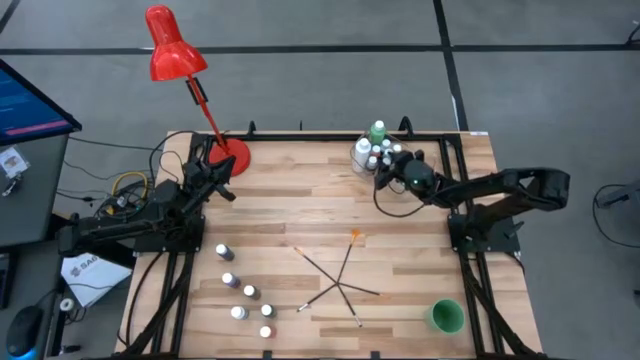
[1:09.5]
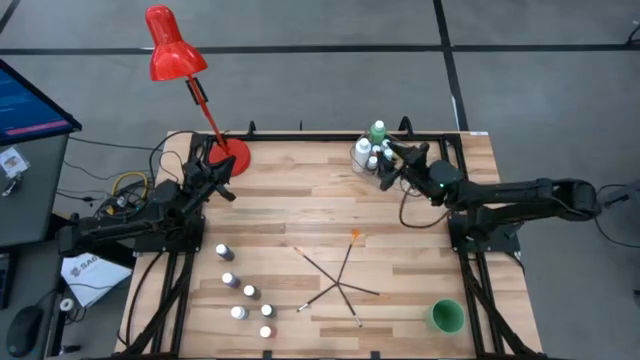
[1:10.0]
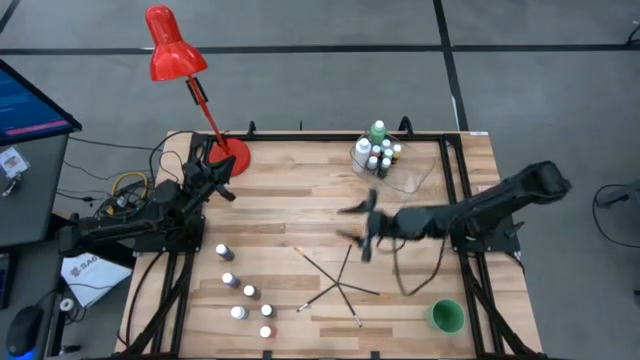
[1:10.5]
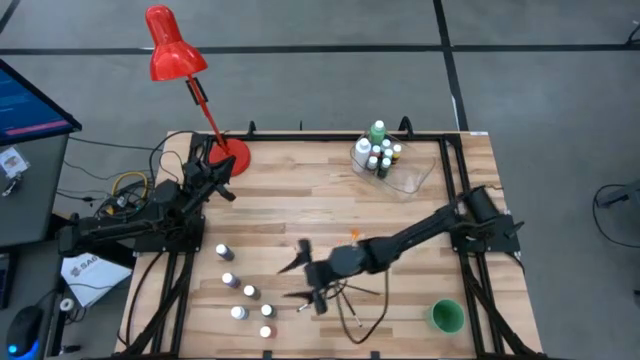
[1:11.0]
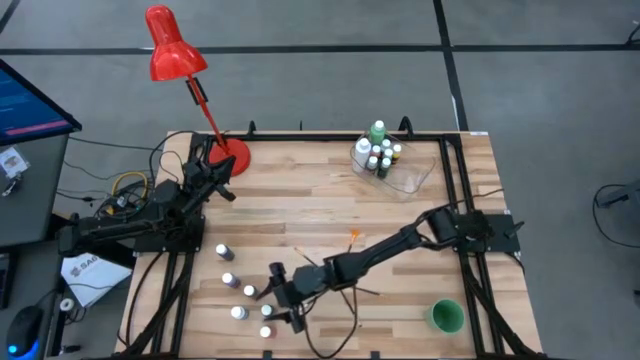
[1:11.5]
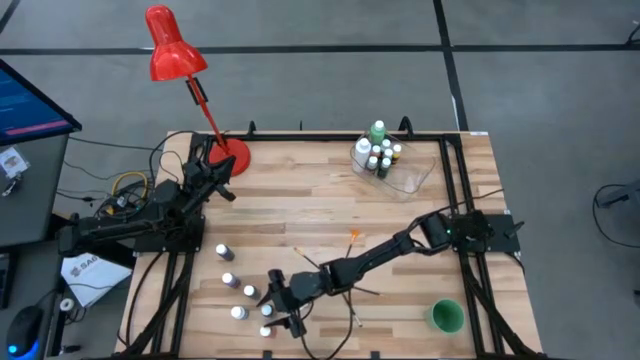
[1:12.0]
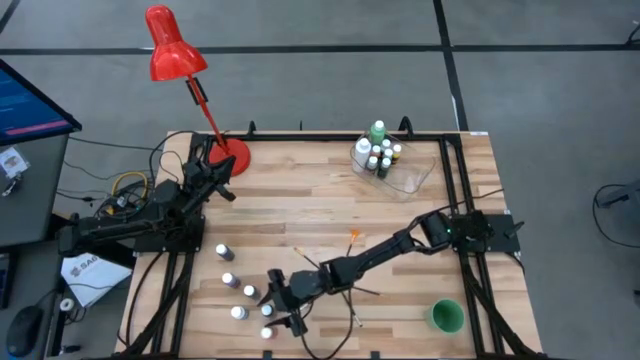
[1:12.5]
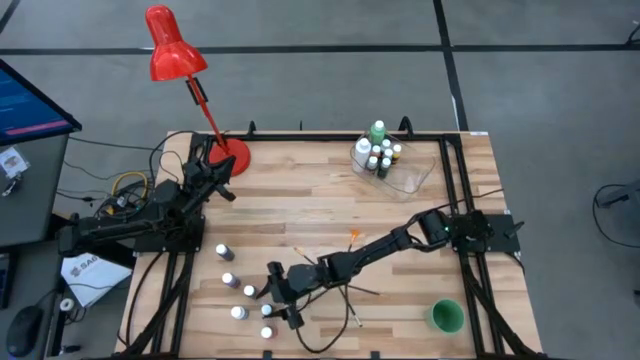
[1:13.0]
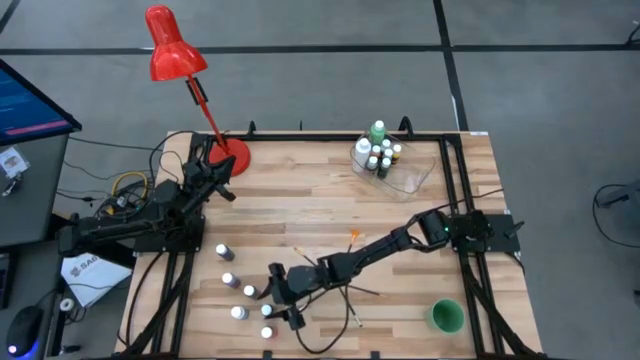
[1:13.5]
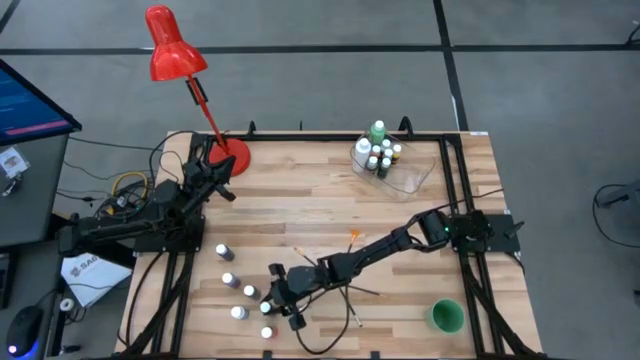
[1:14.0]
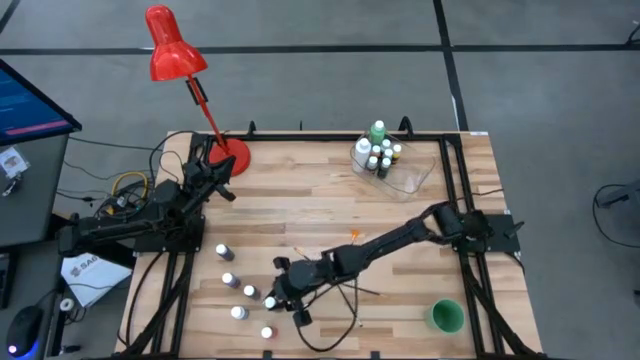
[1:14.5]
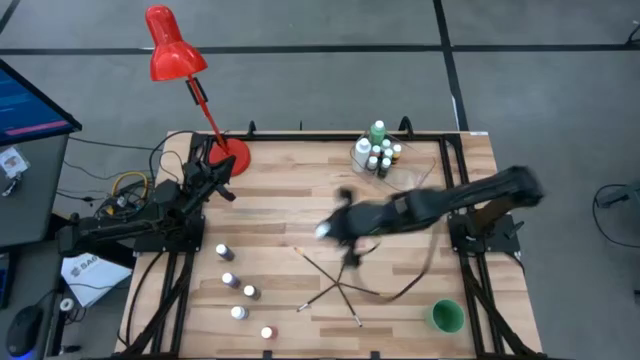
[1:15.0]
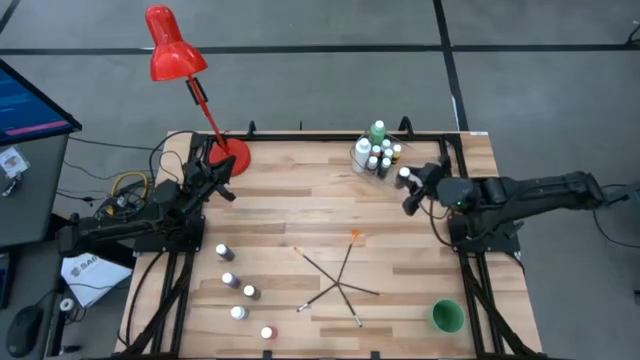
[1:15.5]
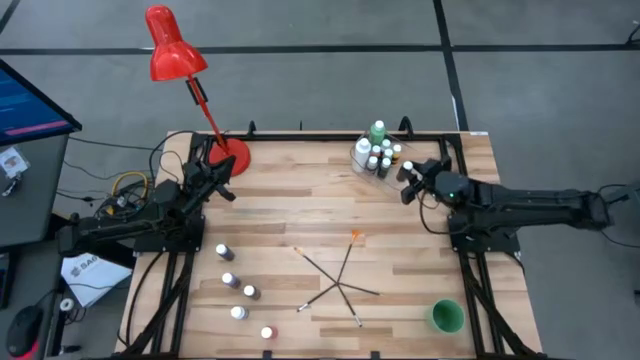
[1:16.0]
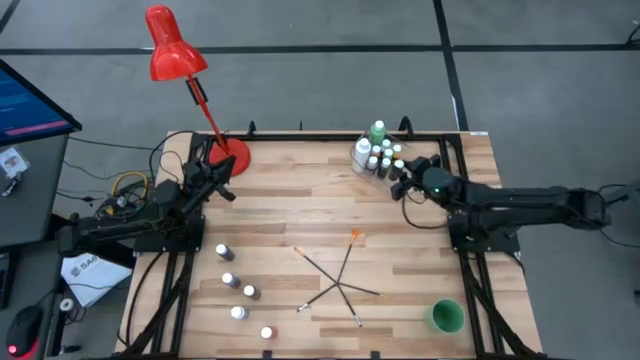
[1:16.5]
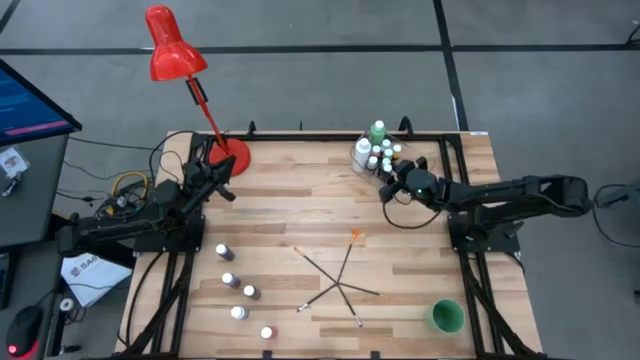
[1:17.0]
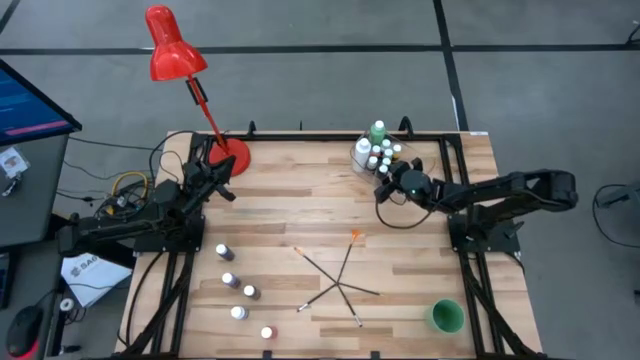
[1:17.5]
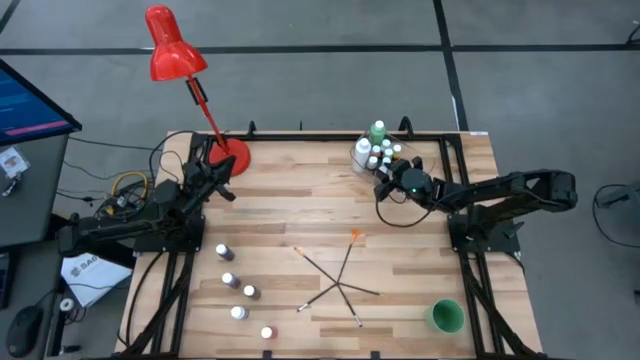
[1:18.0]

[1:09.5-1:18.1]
Task: Pick & Place Paint Supplies
Put the small black paint bottle into the transparent bin

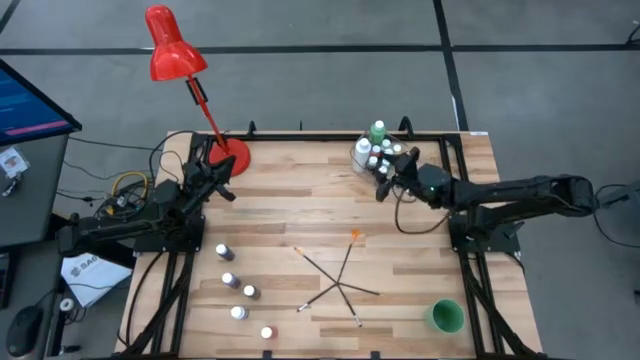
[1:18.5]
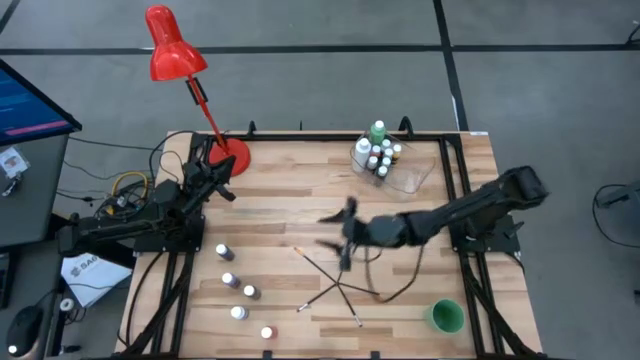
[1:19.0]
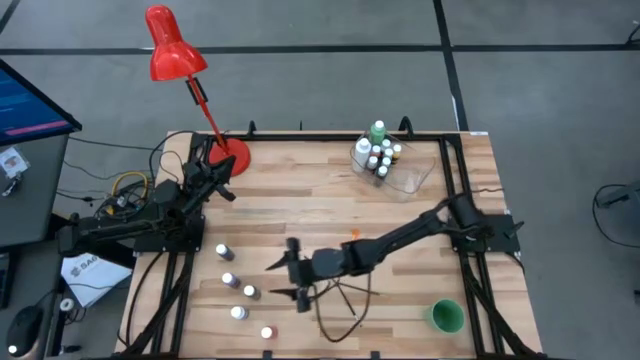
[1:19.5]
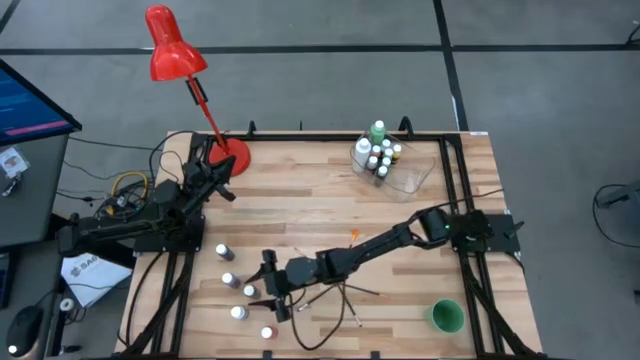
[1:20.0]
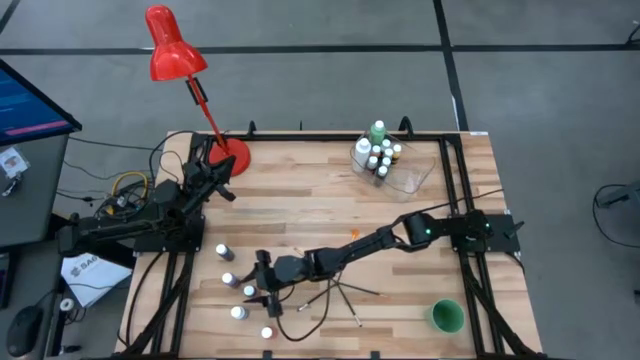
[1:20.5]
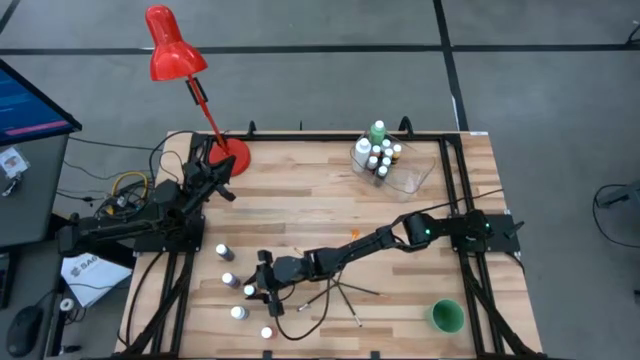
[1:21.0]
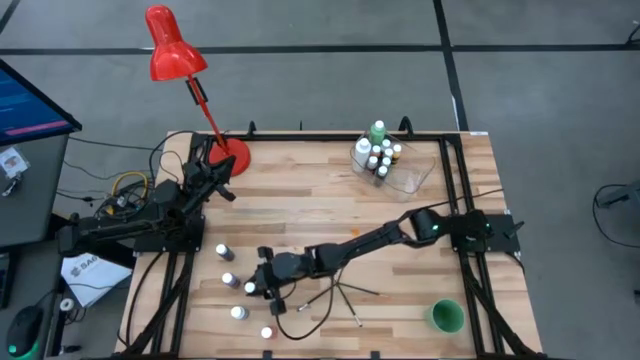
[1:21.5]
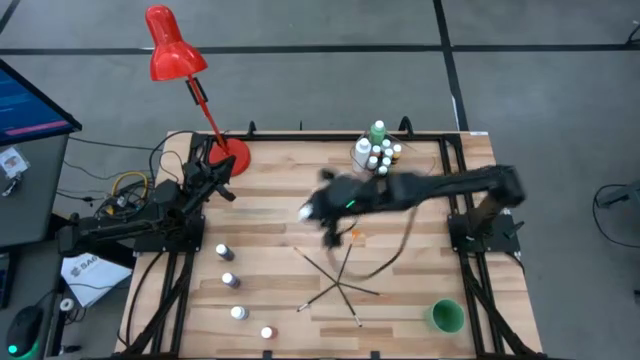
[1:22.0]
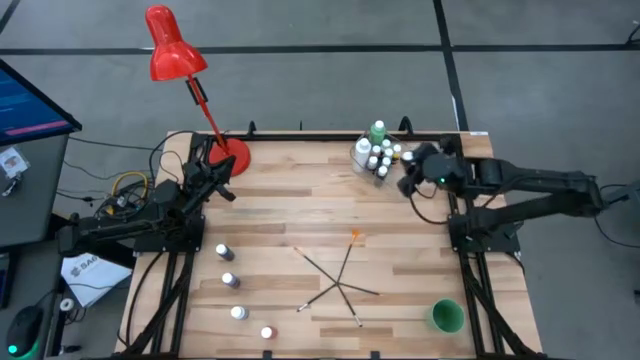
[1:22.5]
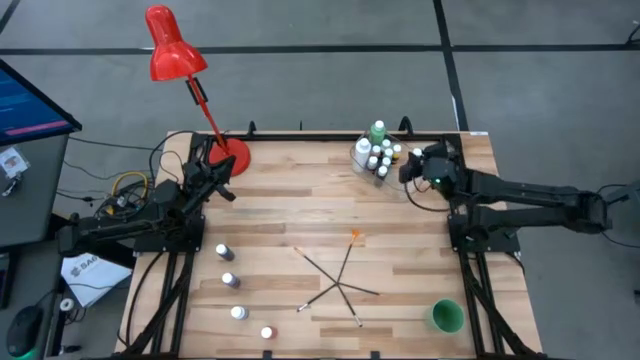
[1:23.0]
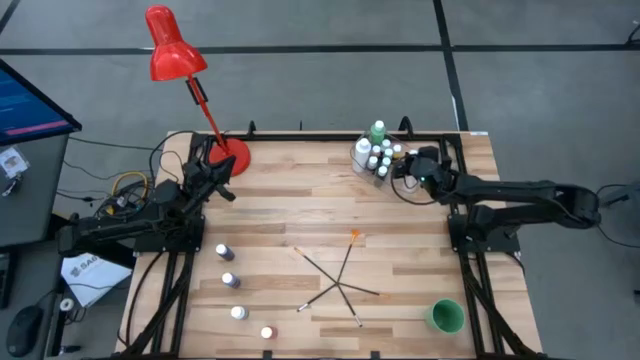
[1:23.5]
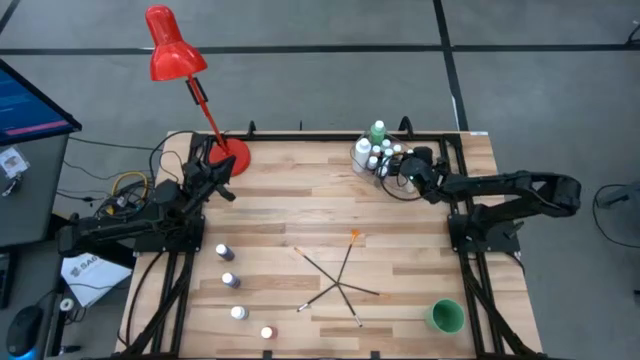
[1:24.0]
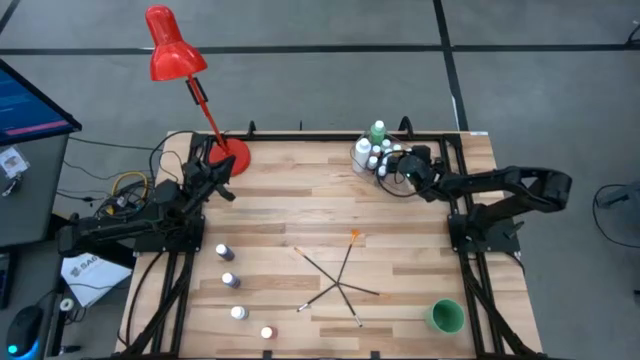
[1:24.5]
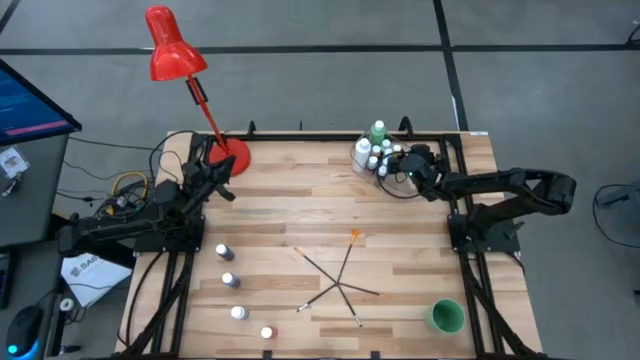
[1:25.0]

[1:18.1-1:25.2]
Put the small black paint bottle into the transparent bin

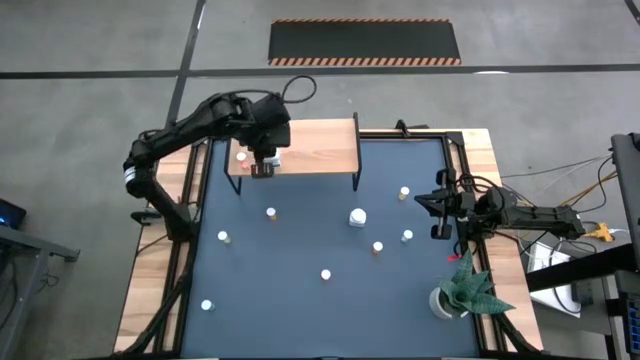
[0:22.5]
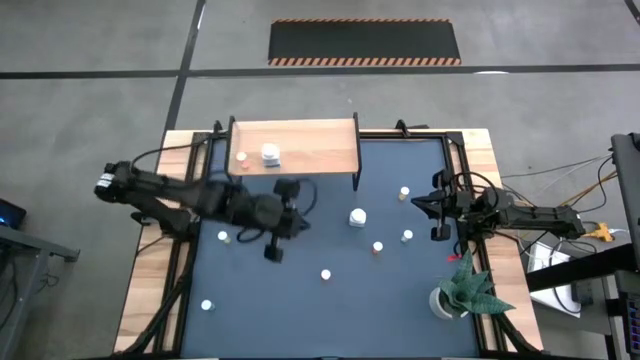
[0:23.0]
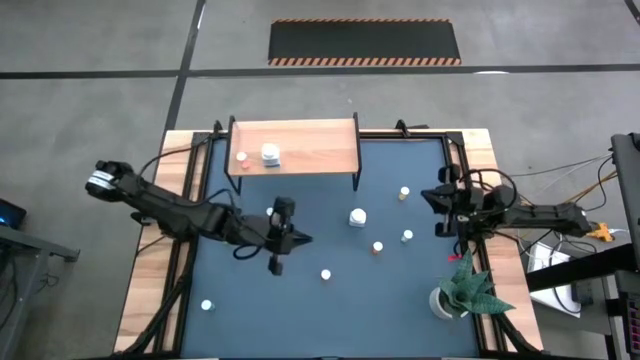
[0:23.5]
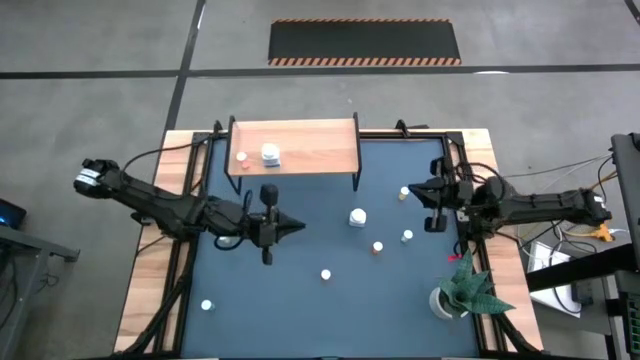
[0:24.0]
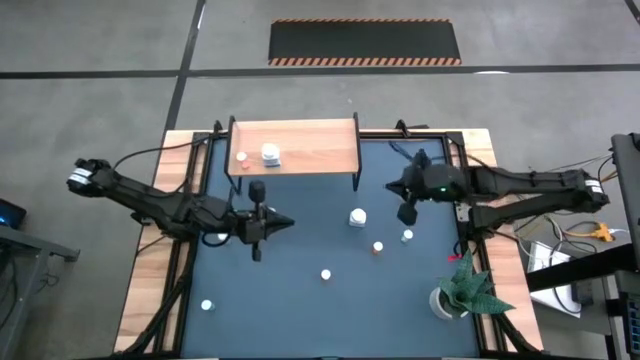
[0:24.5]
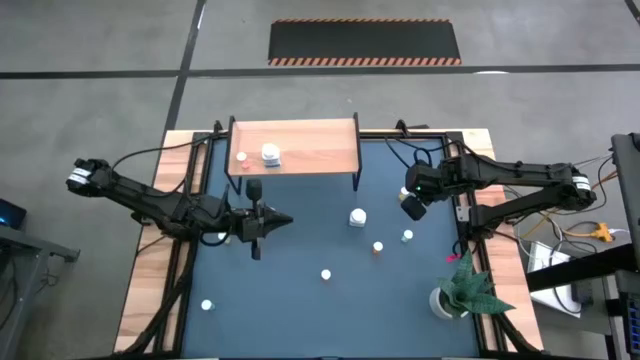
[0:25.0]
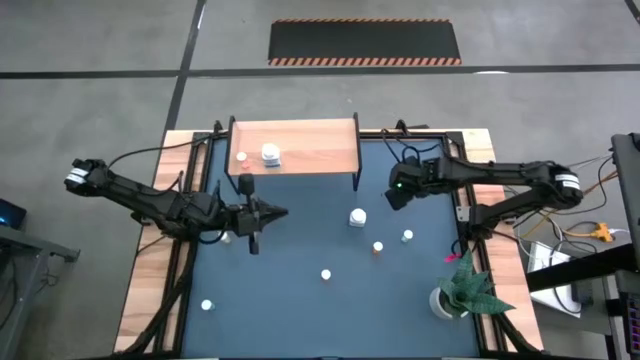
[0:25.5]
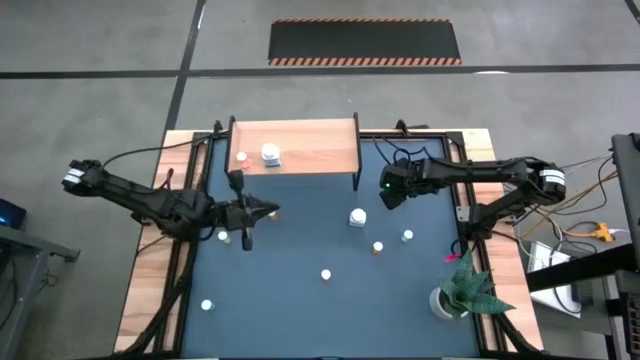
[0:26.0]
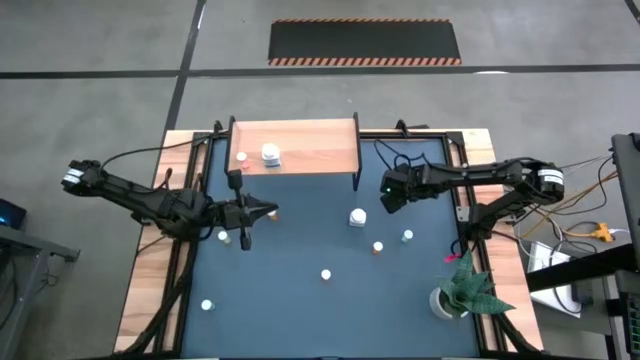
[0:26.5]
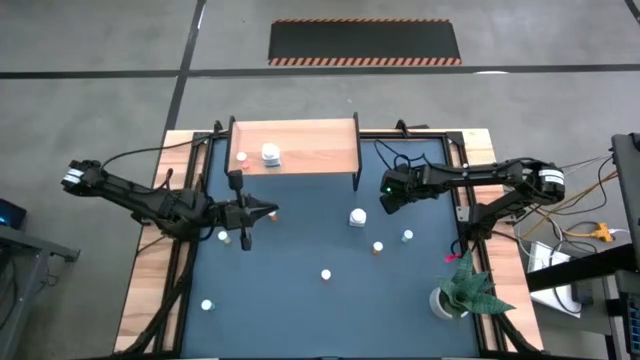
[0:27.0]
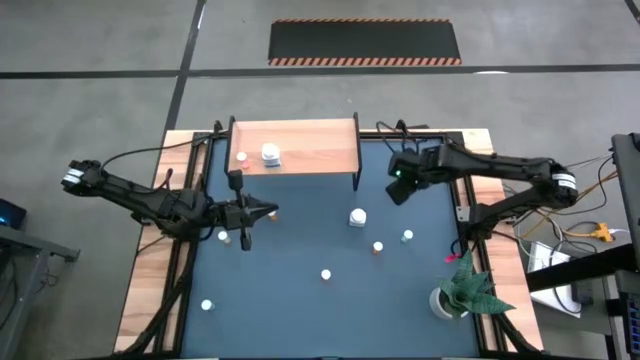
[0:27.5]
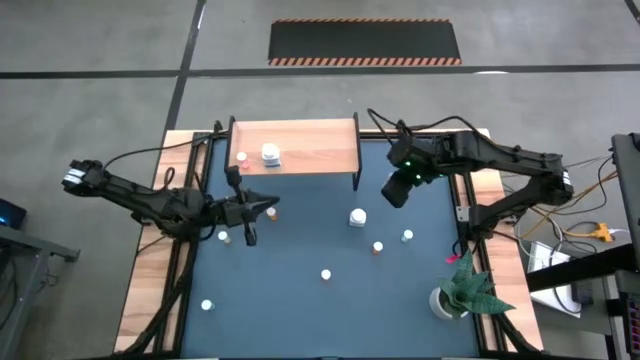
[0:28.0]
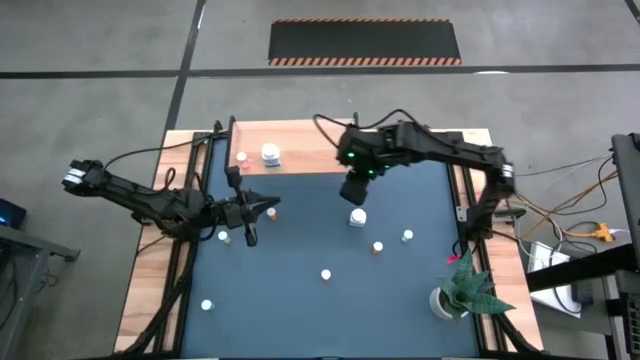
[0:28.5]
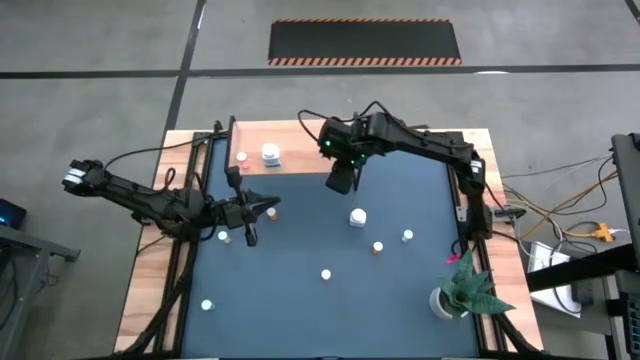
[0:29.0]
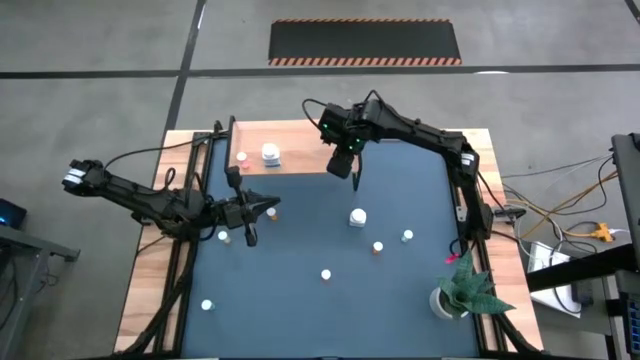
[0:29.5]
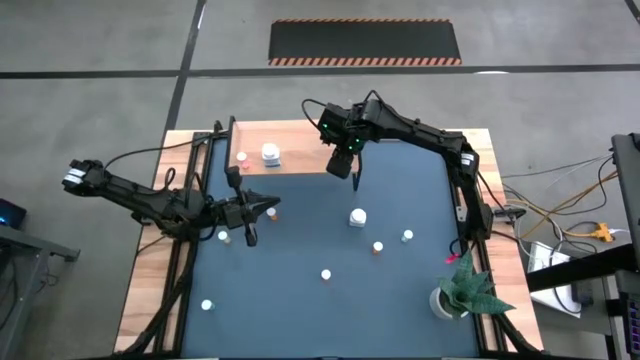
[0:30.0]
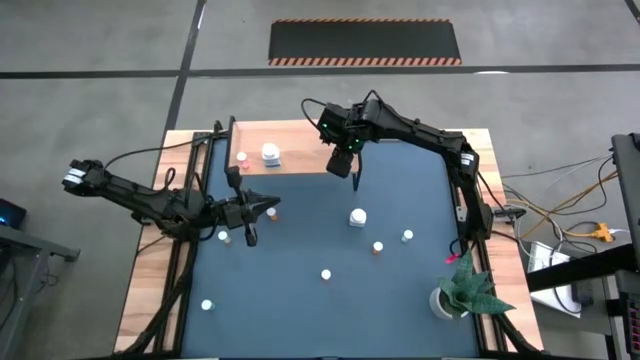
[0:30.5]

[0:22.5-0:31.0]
Task: Pick and place medicine bottles onto shelf by color
Put the yellow pill bottle on the shelf
